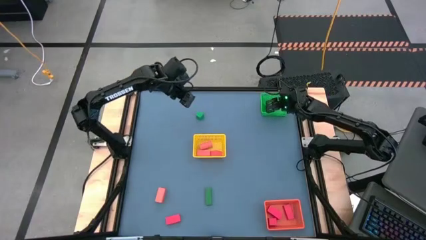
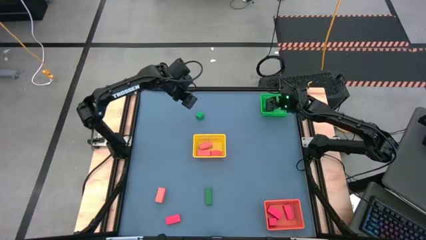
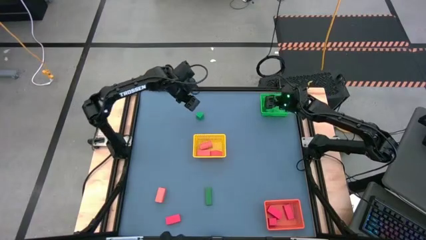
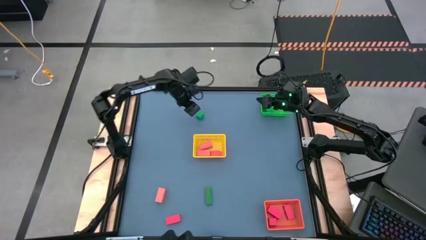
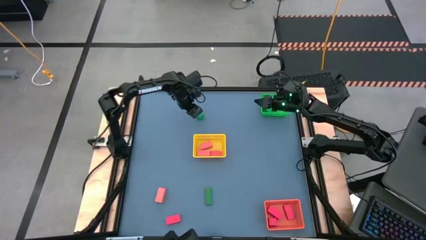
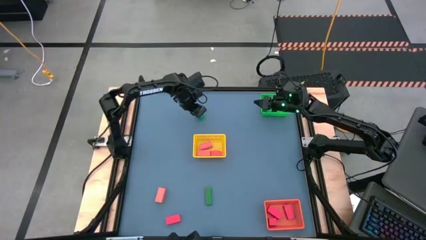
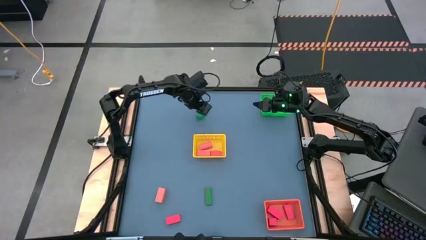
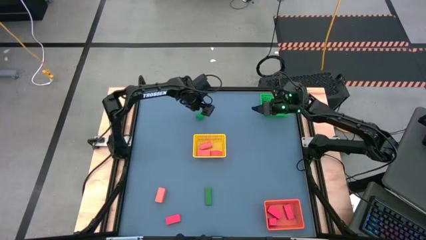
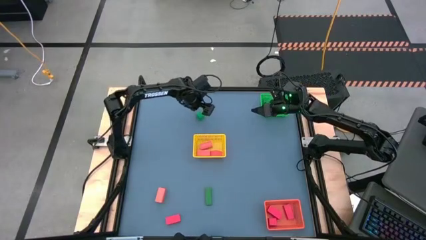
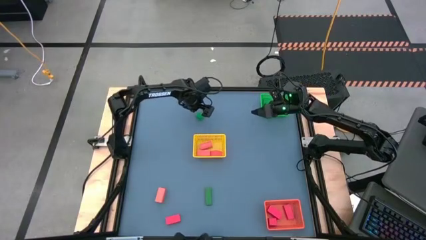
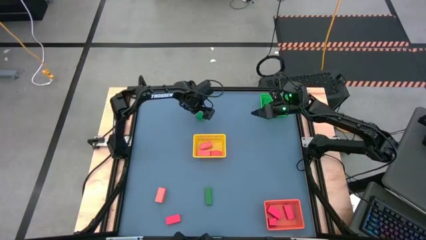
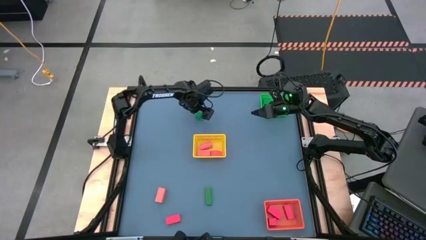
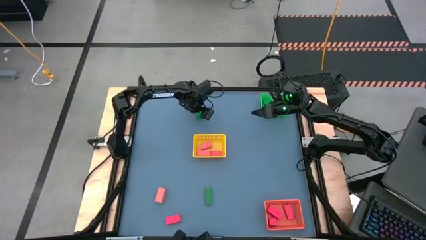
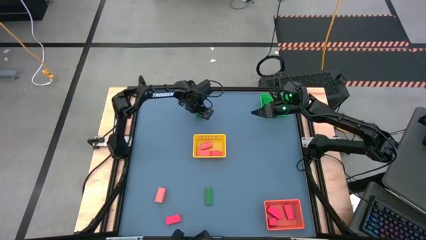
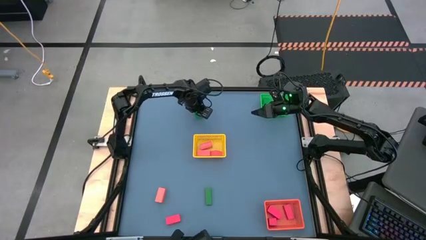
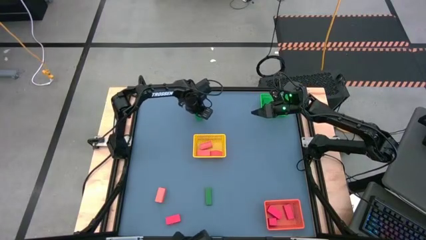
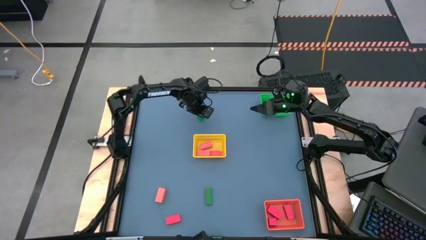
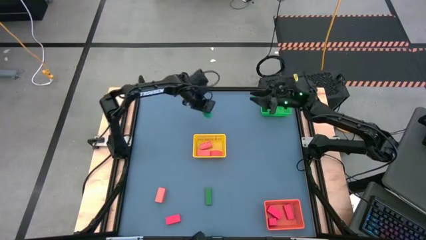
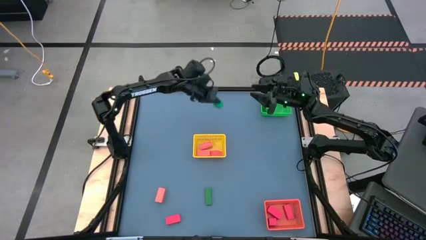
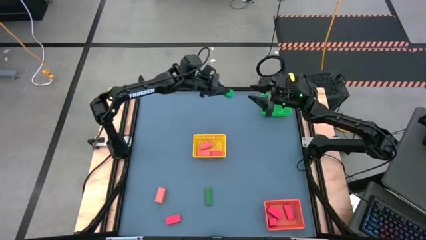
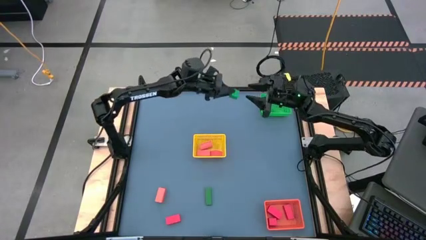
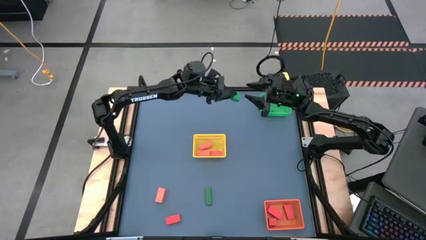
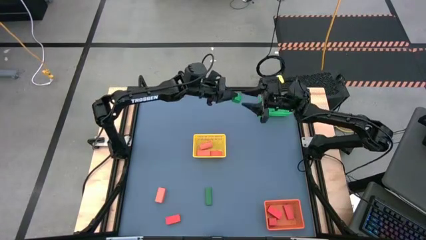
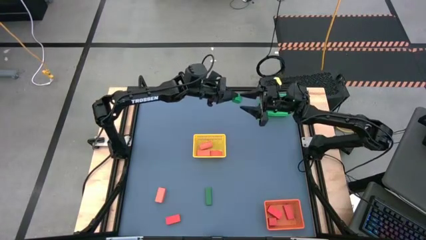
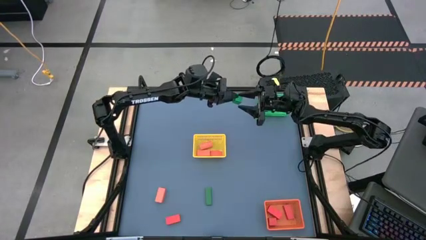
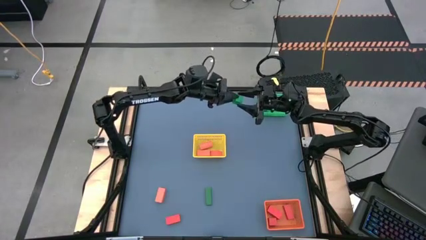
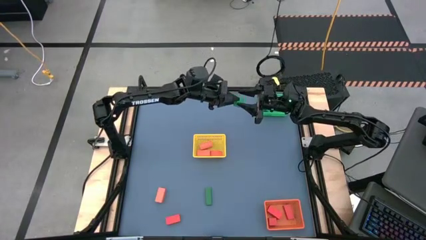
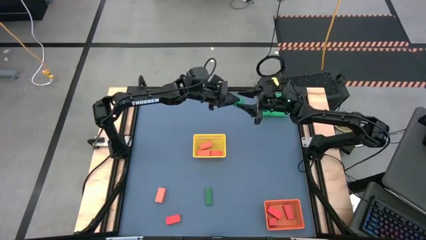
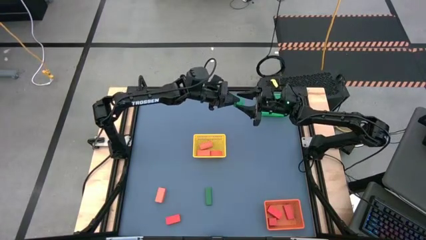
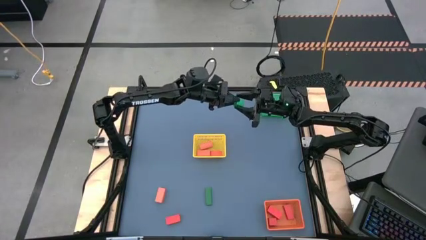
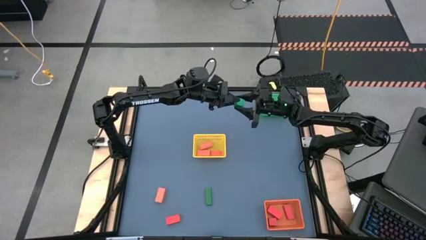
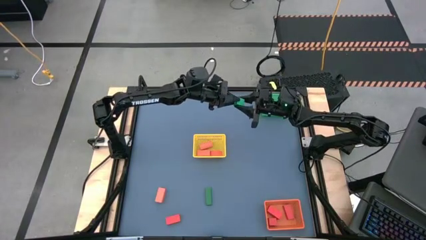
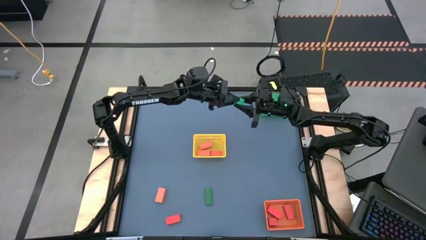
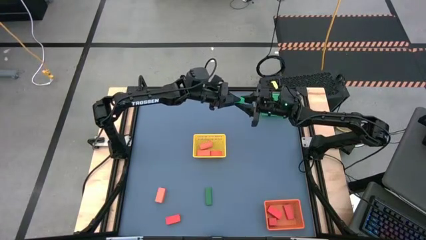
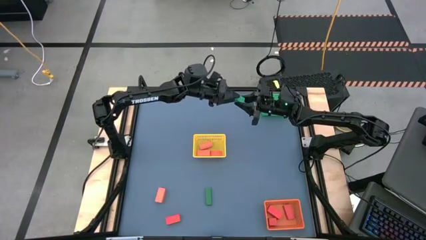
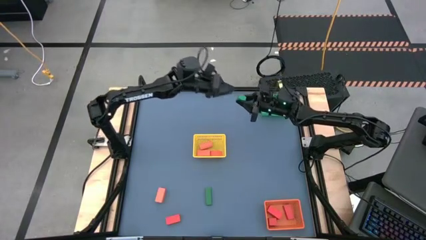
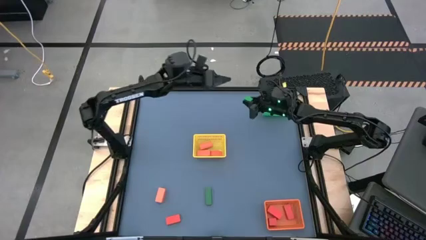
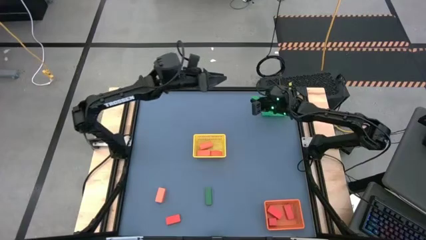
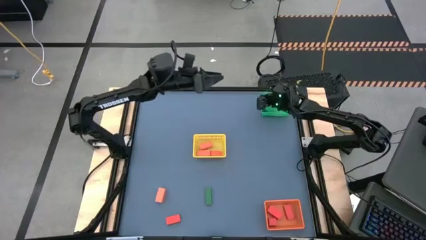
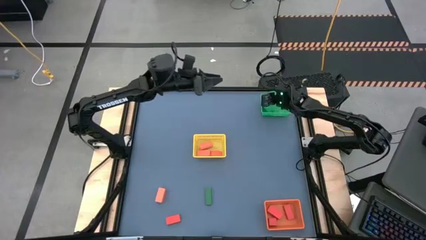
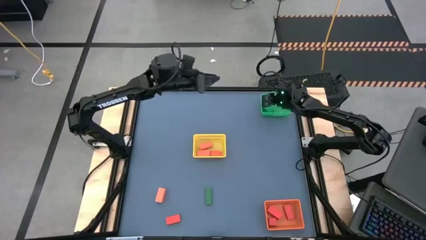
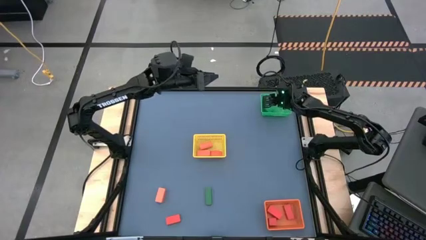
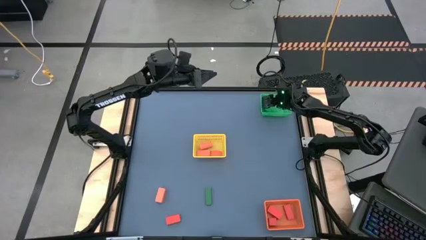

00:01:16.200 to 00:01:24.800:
Task: Sort & place blocks by color
Put the green block into the green basket

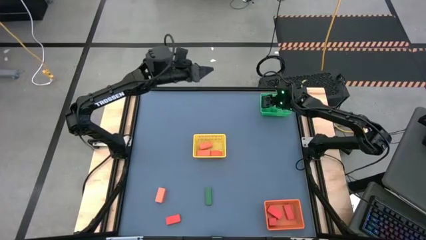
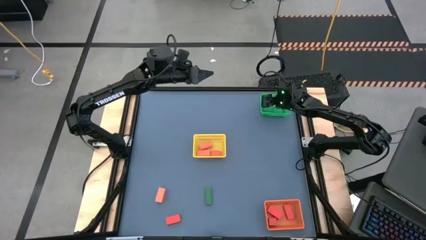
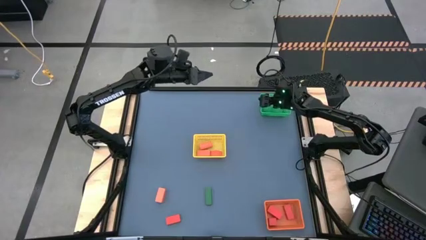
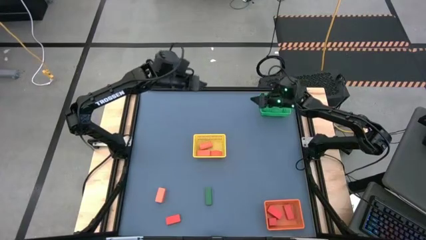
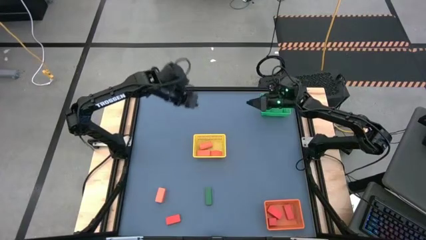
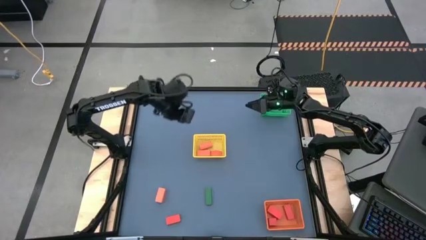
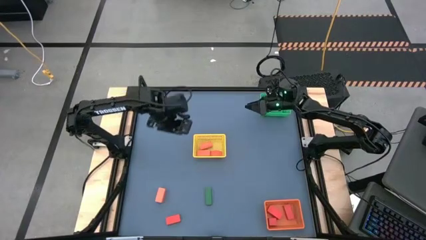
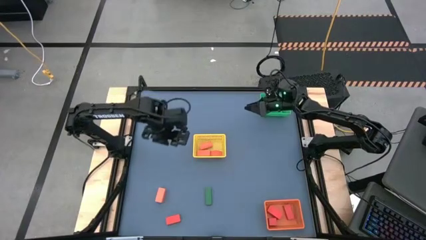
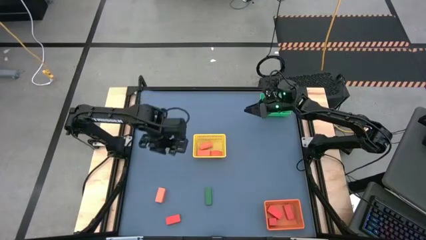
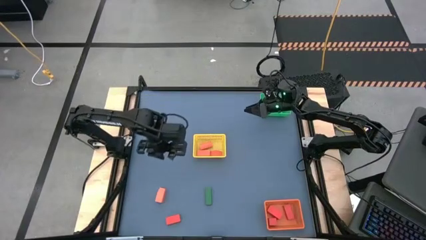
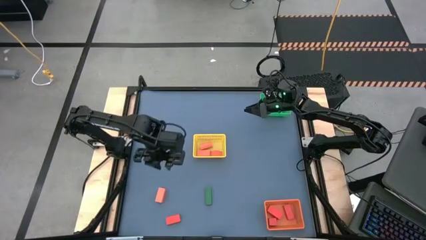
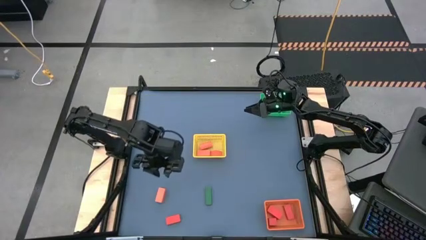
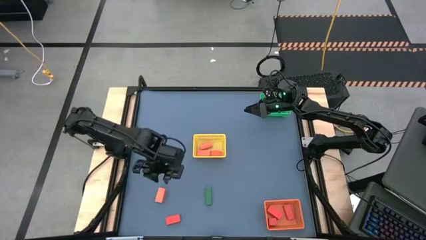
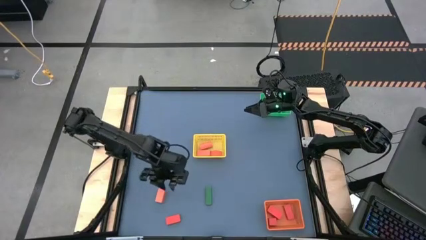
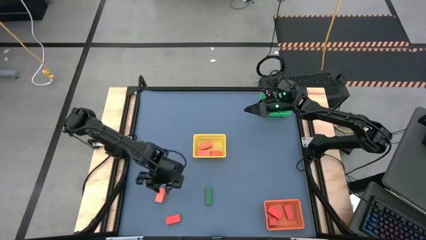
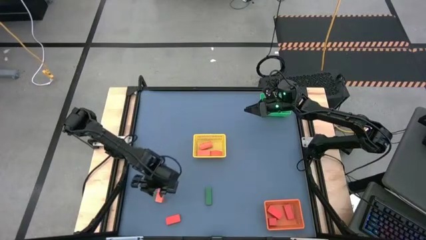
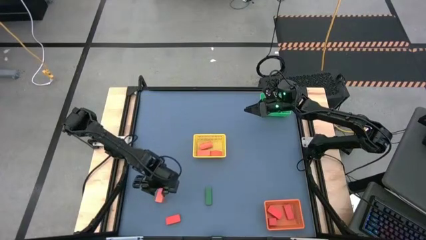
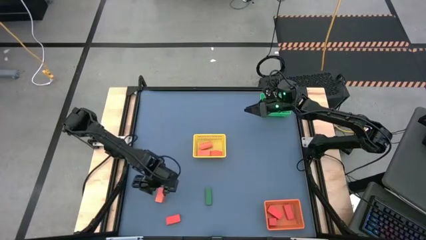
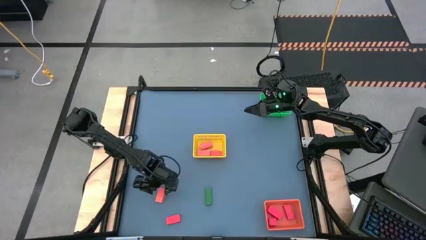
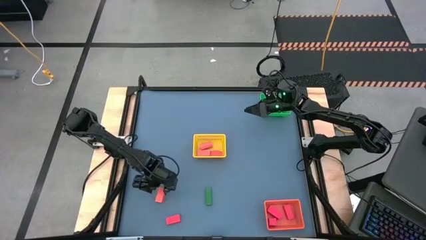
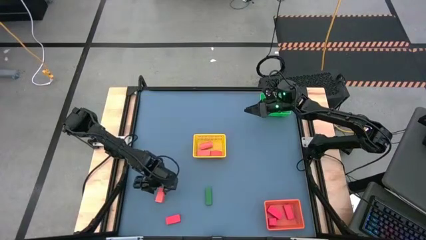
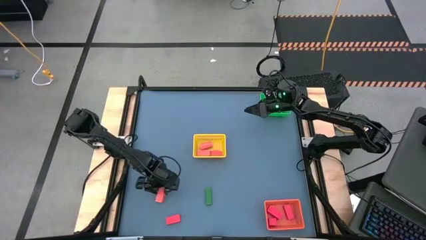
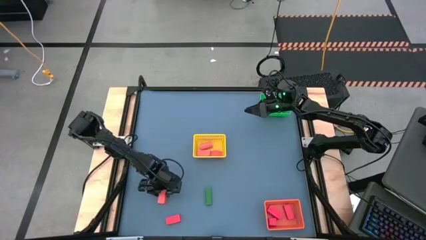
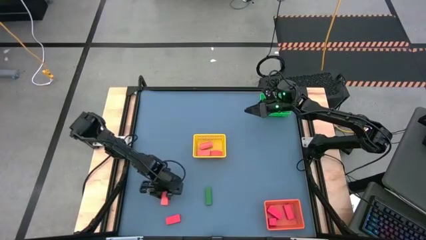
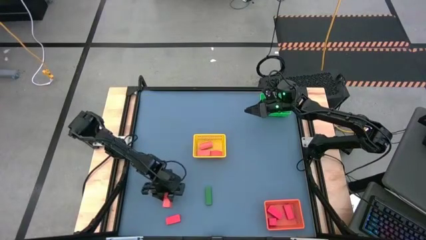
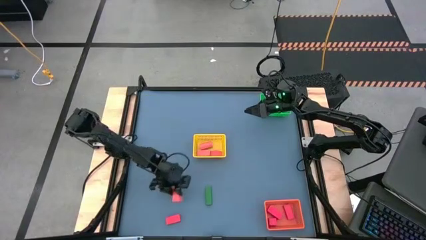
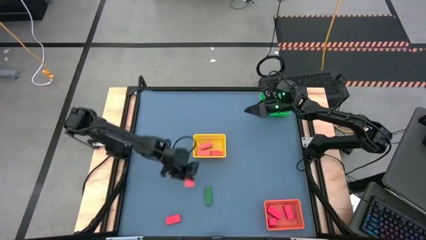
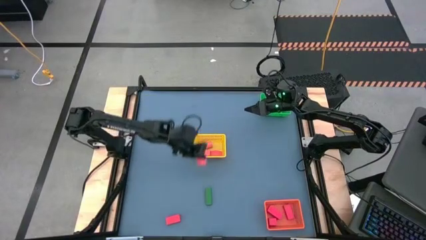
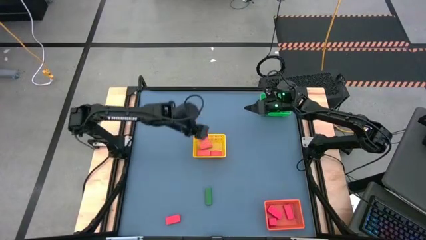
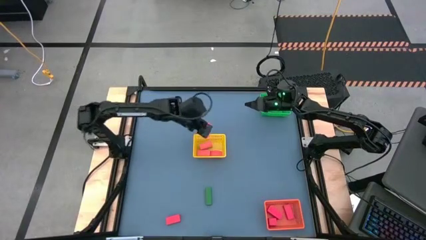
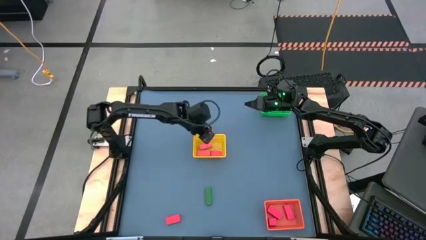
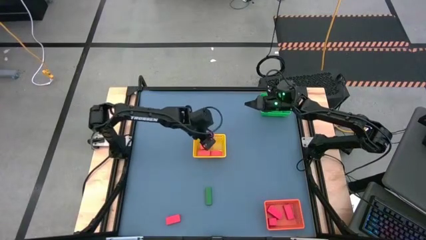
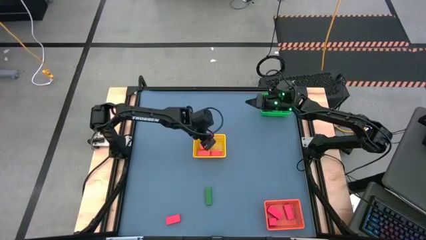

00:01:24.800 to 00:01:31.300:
Put the orange block into the yellow basket

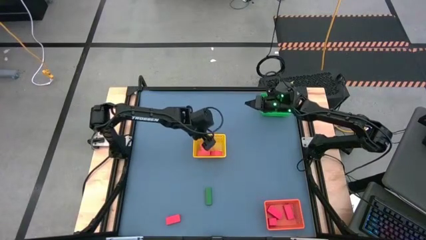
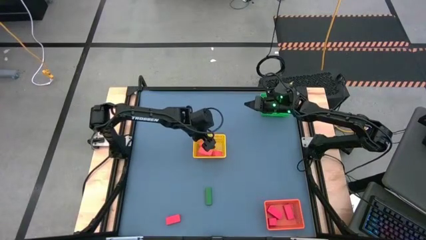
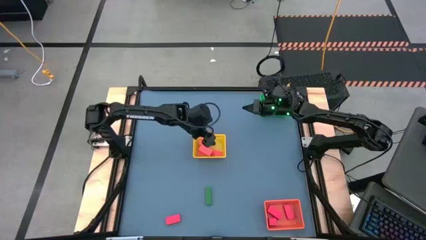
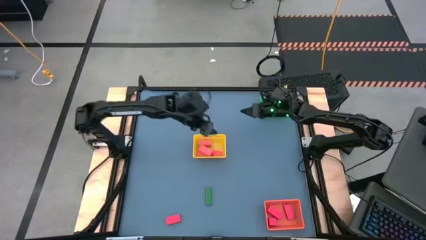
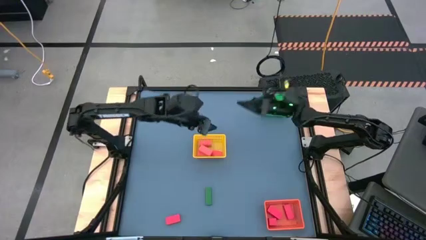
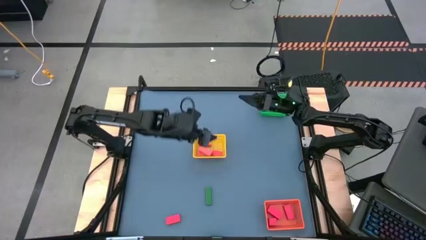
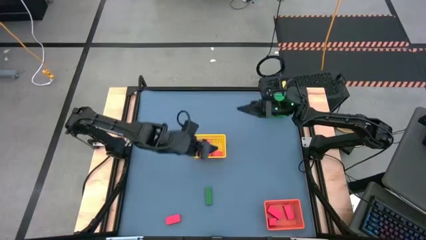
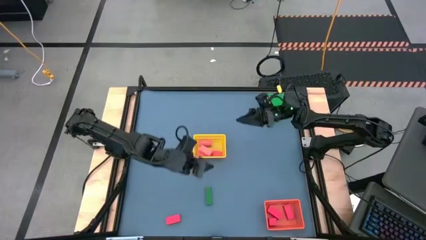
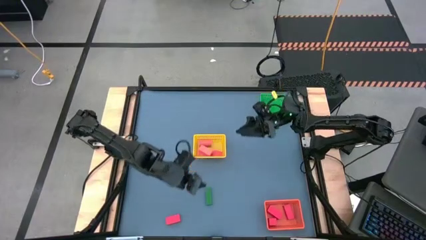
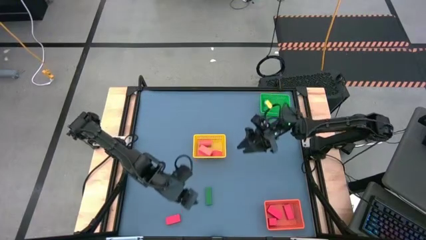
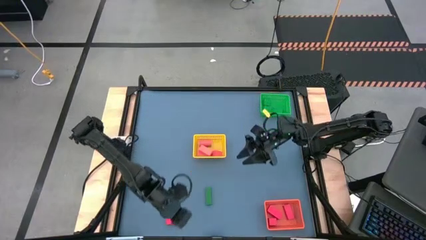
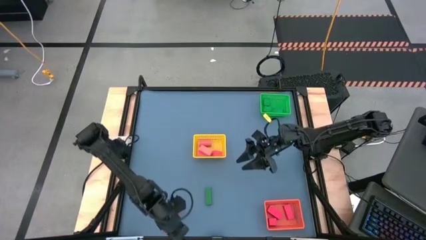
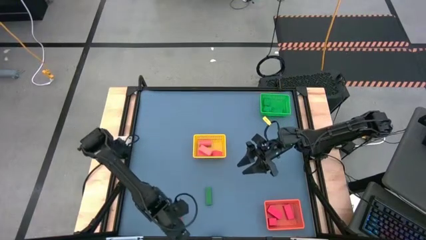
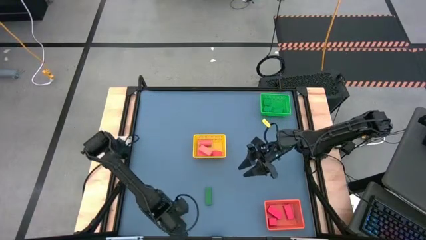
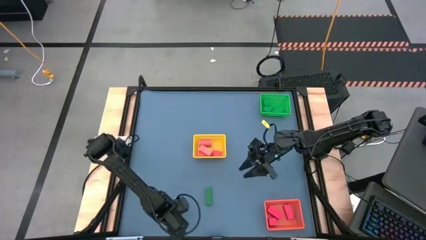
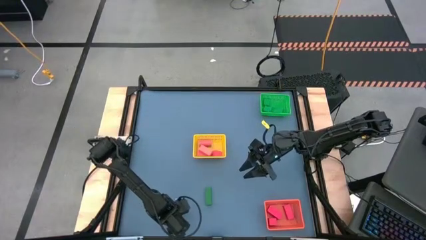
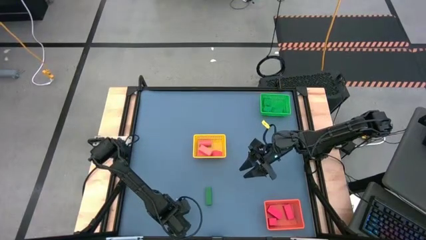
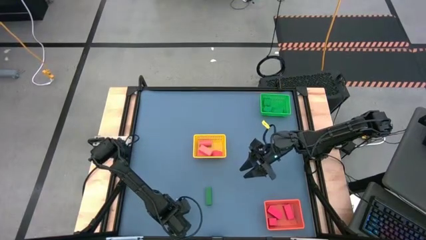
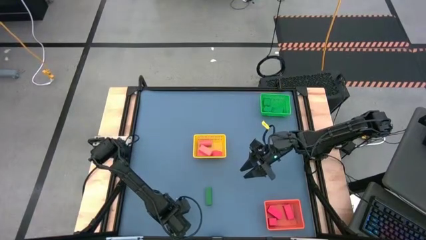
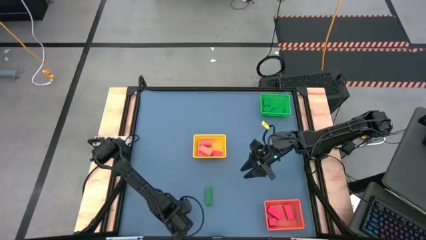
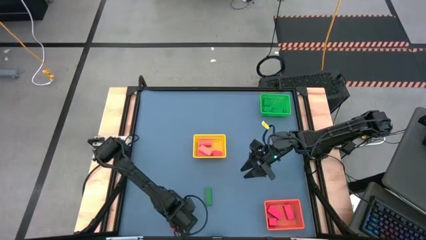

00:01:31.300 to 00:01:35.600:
Put the red block into the orange basket
